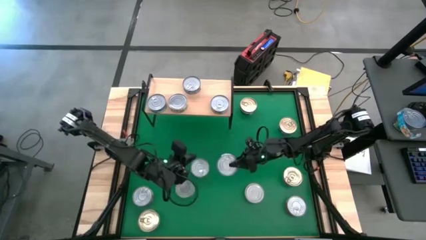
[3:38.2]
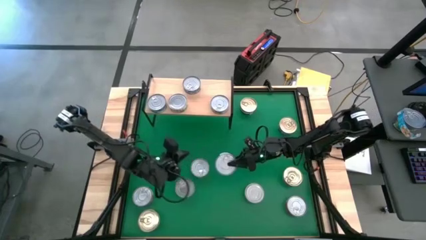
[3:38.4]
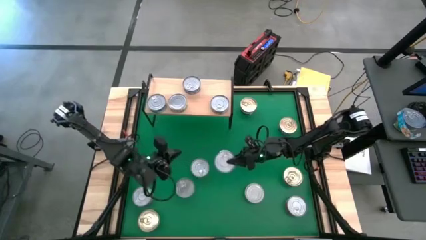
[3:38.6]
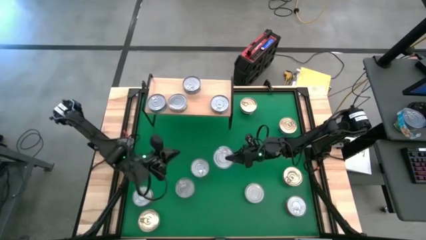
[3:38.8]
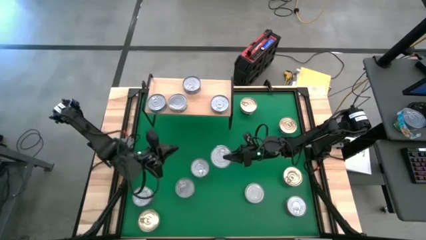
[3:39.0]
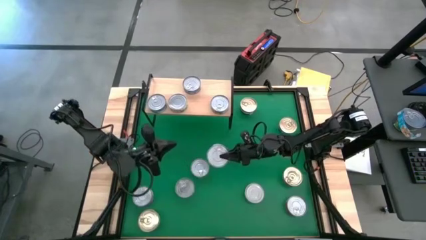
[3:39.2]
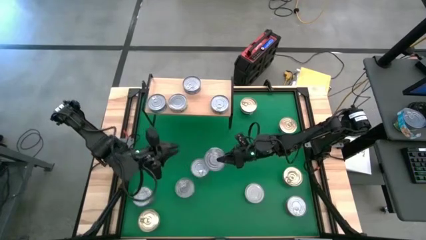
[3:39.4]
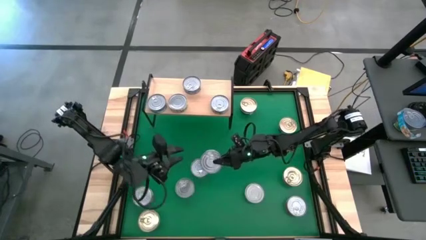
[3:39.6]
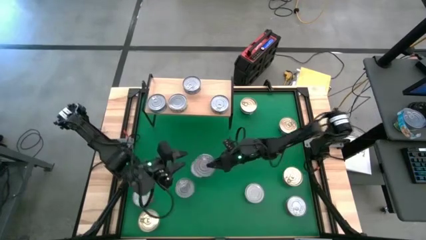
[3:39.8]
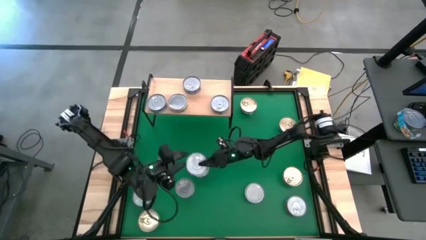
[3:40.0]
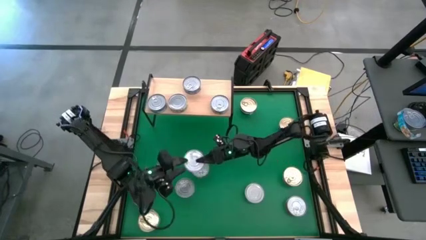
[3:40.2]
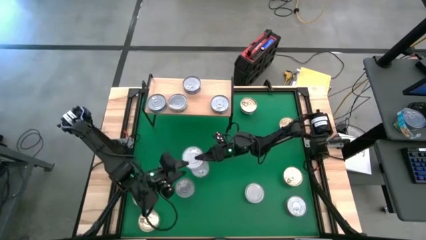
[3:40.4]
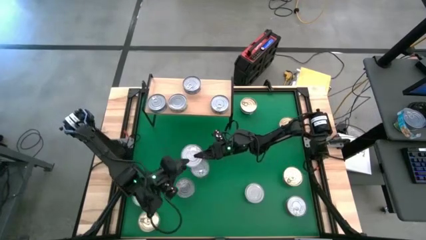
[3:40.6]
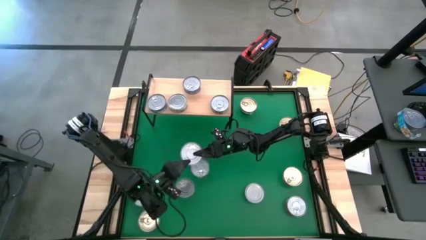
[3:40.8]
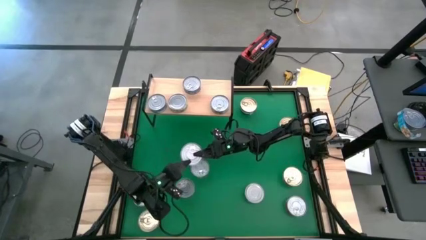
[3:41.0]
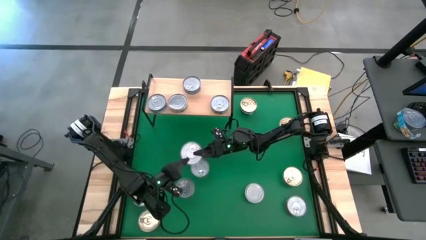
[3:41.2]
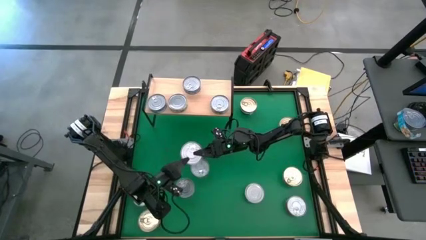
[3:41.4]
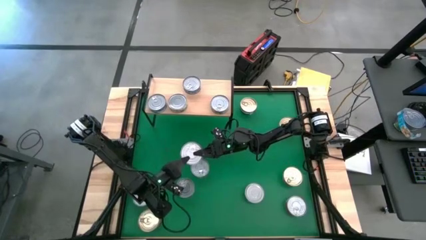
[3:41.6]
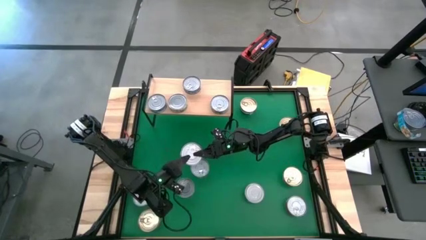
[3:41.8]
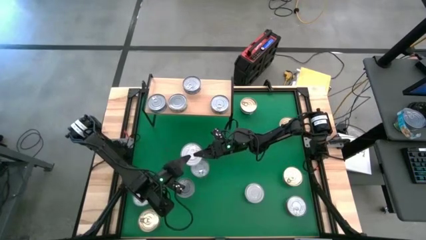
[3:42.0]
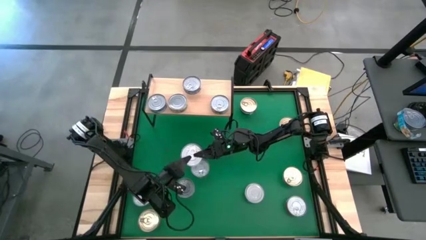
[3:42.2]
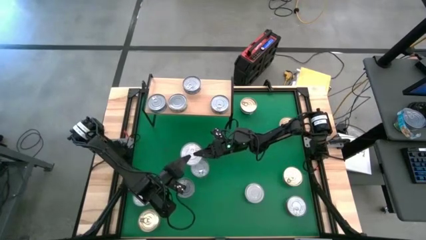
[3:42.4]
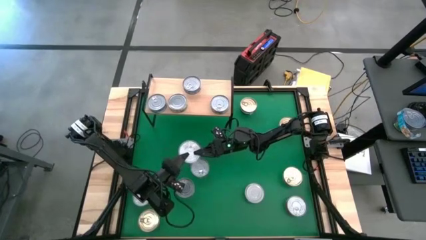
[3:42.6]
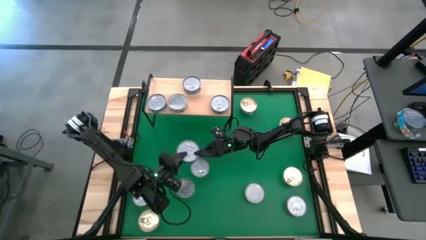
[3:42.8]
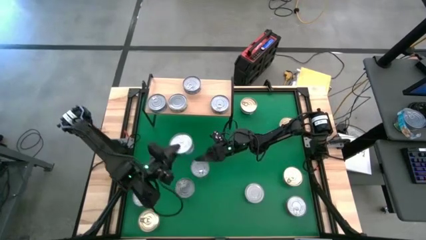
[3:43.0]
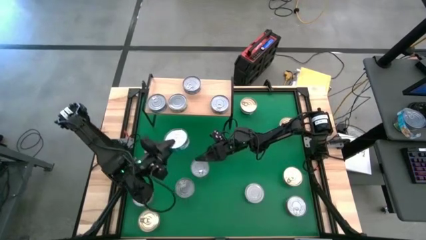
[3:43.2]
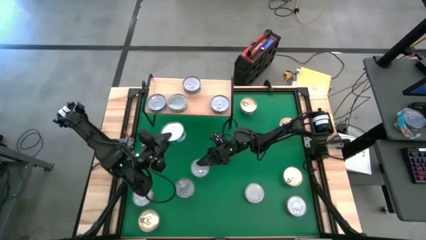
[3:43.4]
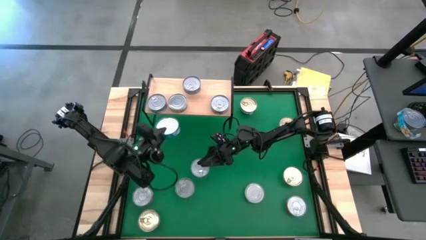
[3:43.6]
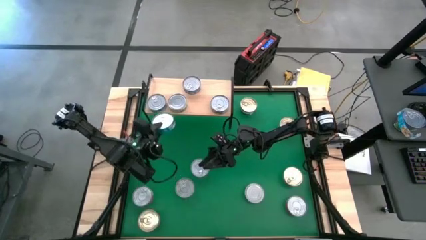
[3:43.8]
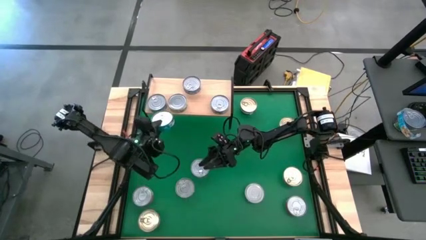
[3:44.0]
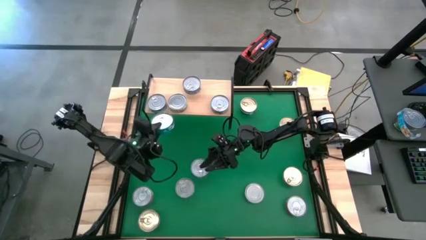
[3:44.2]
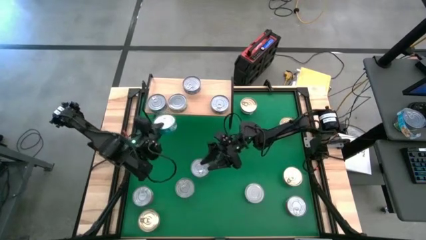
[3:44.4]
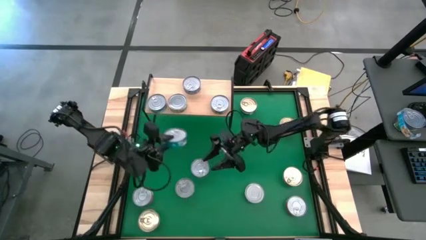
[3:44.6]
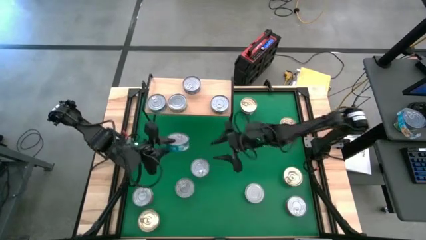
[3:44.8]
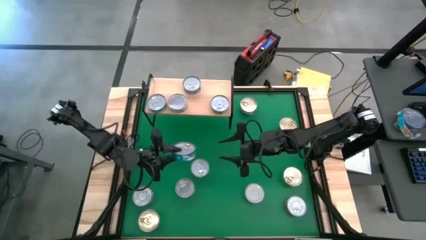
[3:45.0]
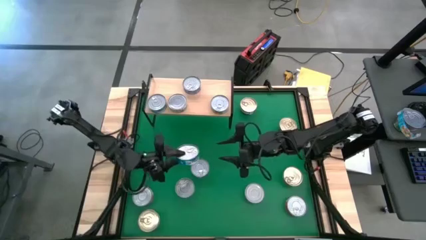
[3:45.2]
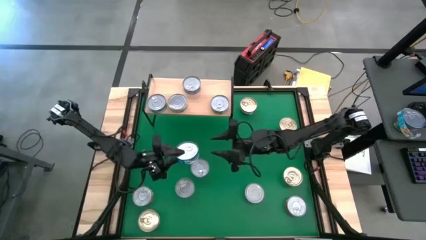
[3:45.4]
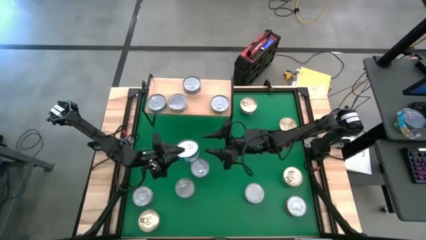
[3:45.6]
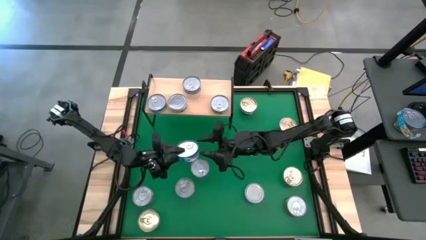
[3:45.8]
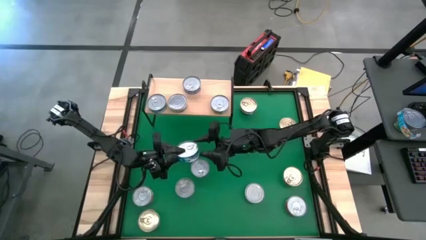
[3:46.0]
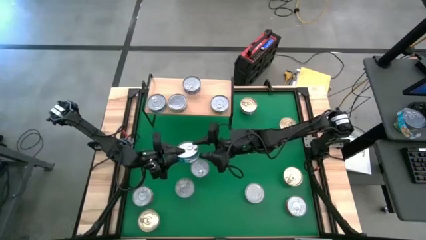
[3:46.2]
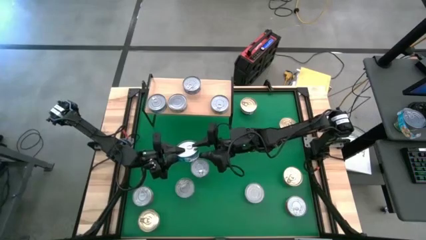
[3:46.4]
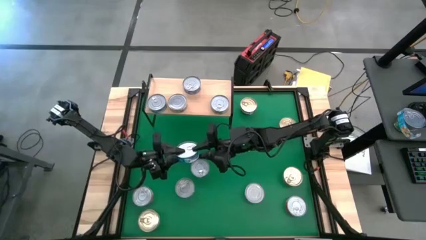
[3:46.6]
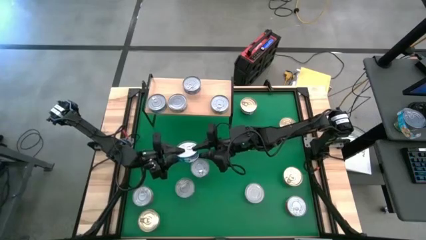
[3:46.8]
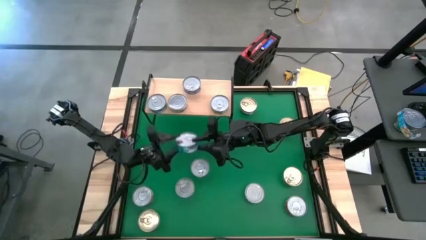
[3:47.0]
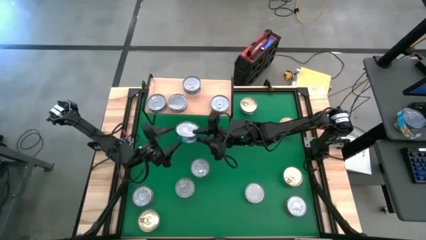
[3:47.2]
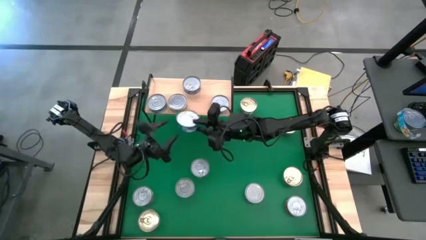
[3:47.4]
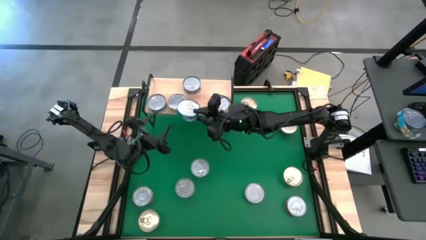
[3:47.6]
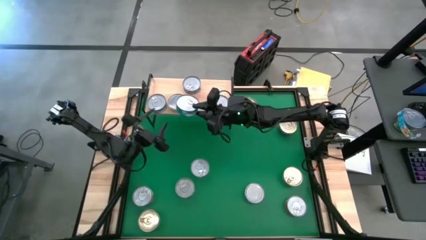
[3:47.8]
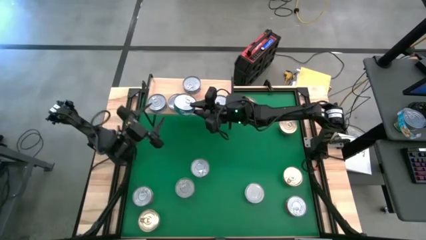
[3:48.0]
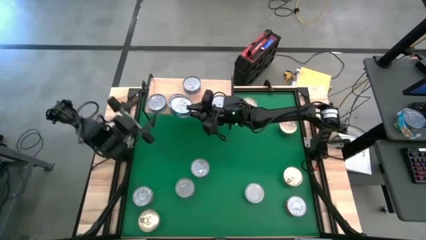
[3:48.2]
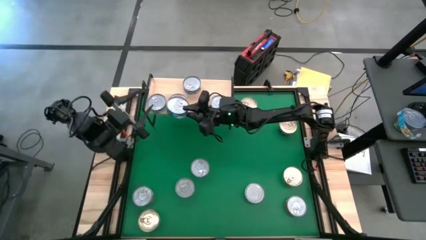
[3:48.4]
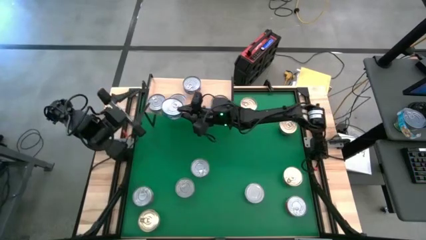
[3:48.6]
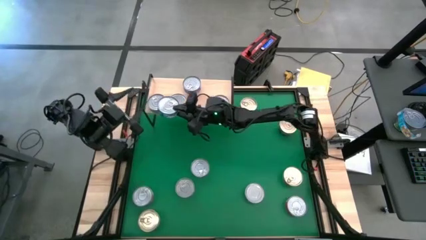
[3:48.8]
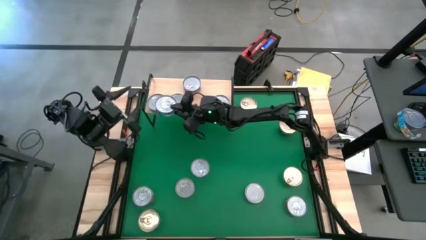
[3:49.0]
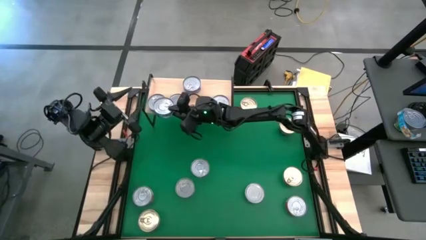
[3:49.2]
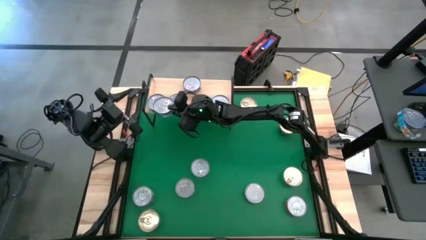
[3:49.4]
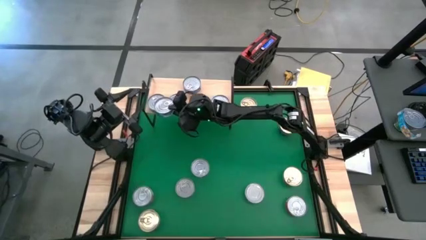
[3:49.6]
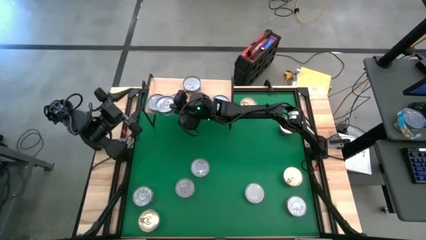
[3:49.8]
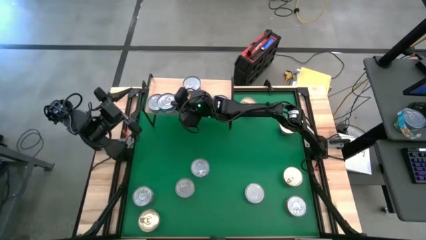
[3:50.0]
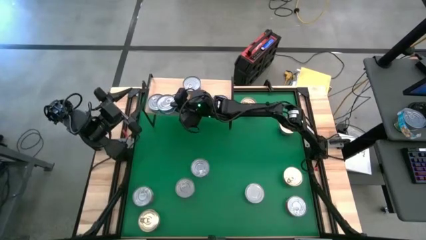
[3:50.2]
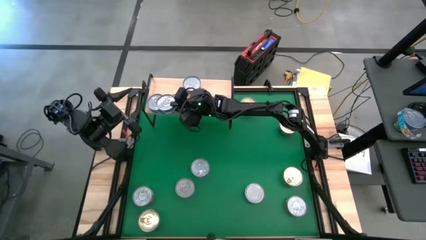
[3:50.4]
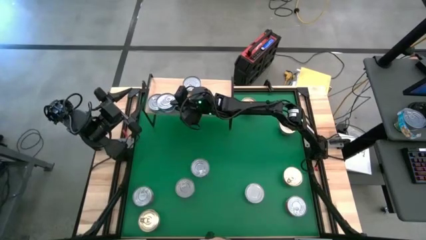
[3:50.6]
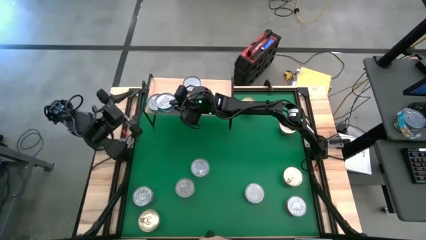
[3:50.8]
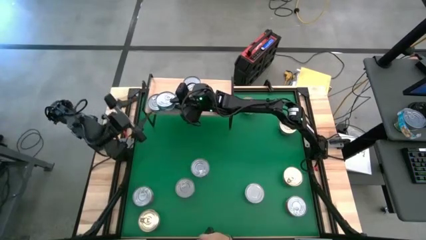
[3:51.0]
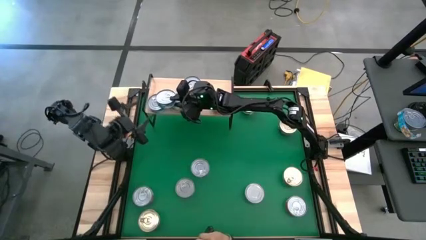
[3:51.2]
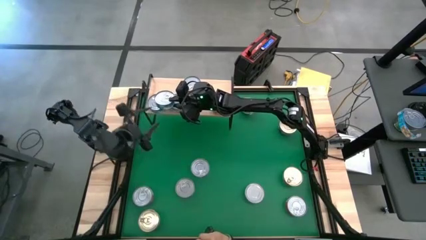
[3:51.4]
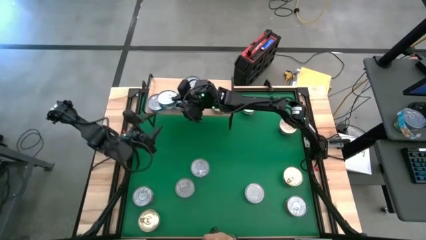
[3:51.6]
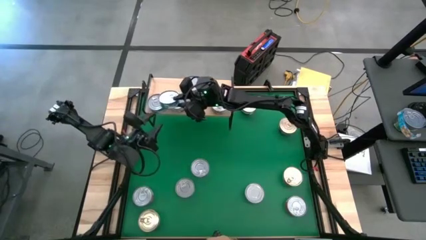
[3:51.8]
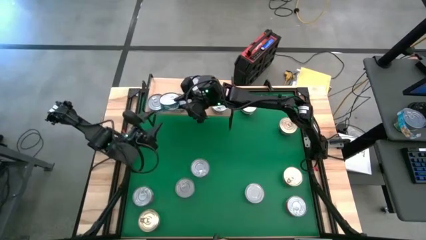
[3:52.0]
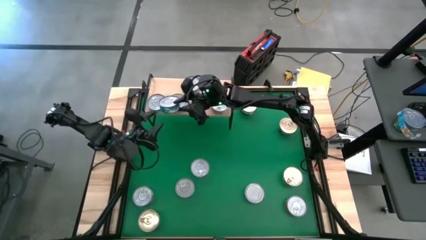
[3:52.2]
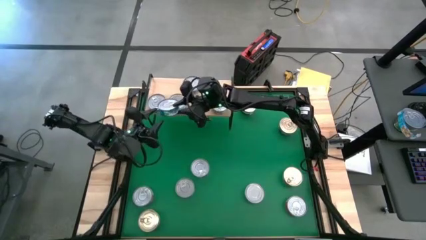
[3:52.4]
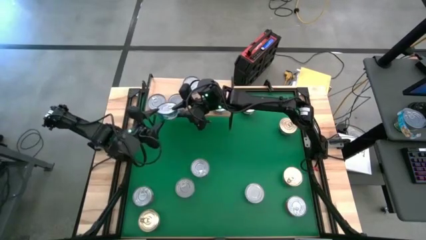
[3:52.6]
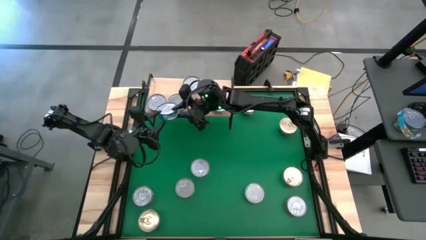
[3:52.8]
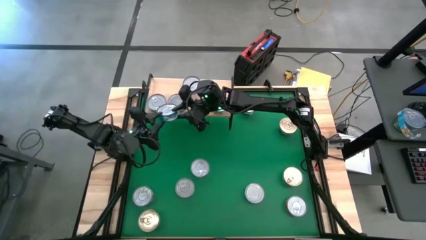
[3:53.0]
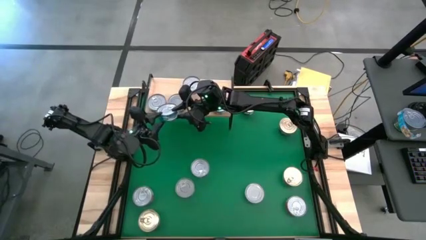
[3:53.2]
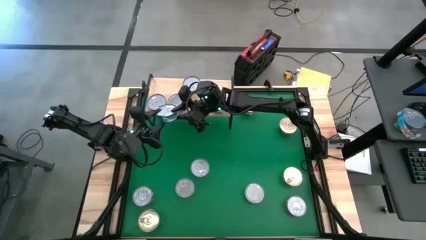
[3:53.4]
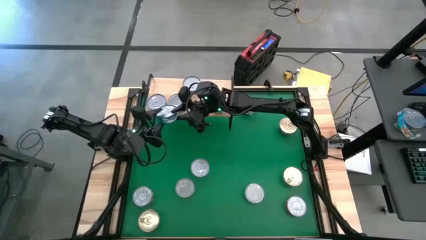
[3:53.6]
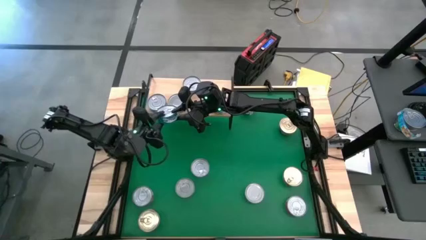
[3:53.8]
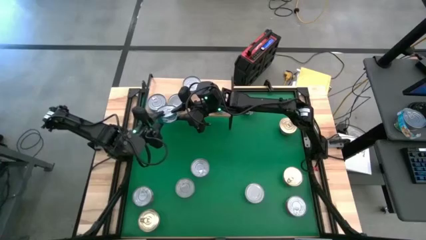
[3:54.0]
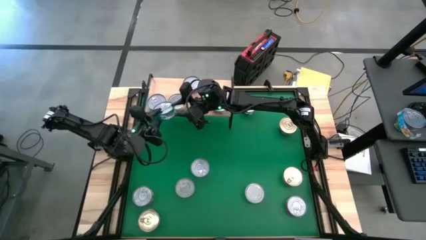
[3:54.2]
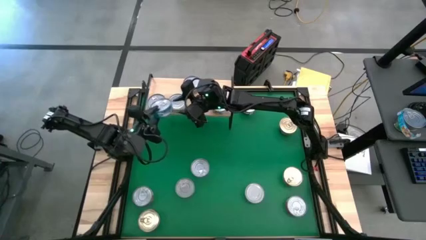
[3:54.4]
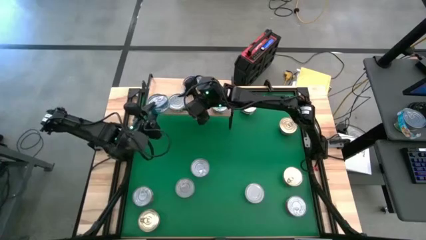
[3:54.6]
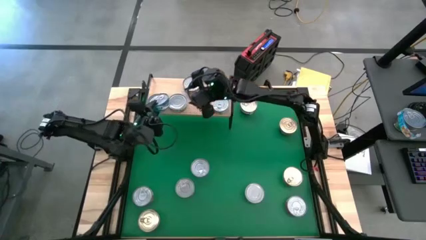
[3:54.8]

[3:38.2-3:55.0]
Task: Stack canned seafood by type on shelf
Stack the center light blue tuna can on top of the light blue tuna can on the shelf
